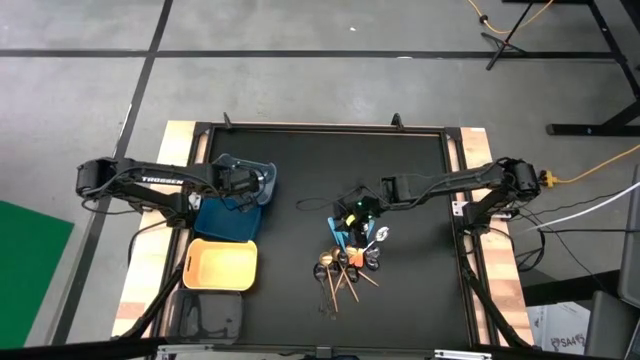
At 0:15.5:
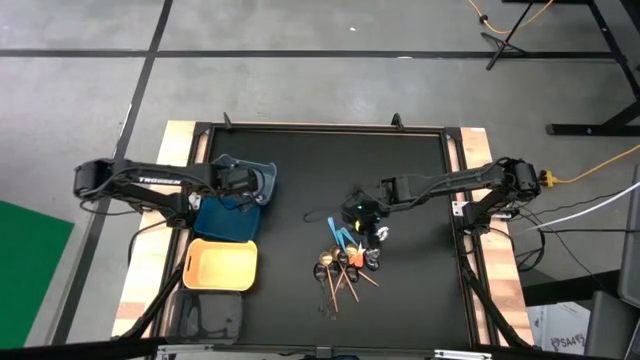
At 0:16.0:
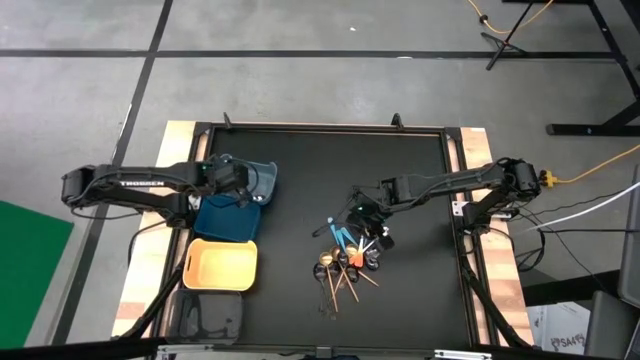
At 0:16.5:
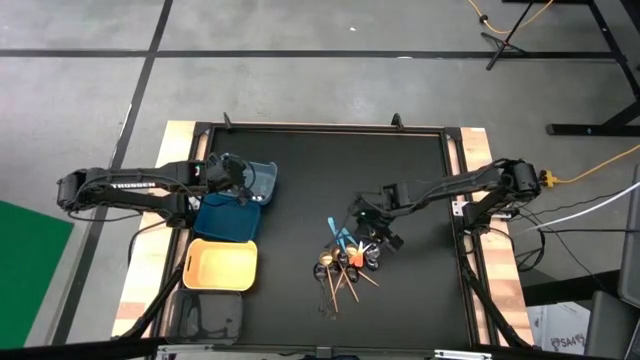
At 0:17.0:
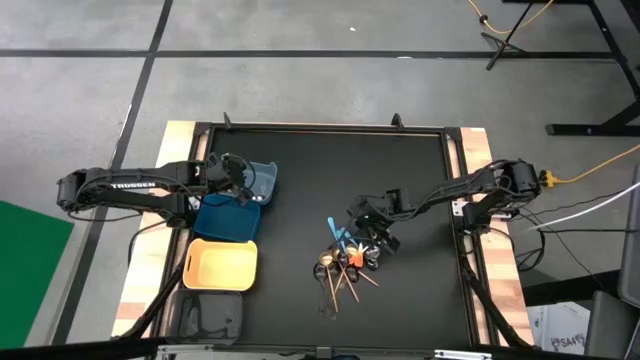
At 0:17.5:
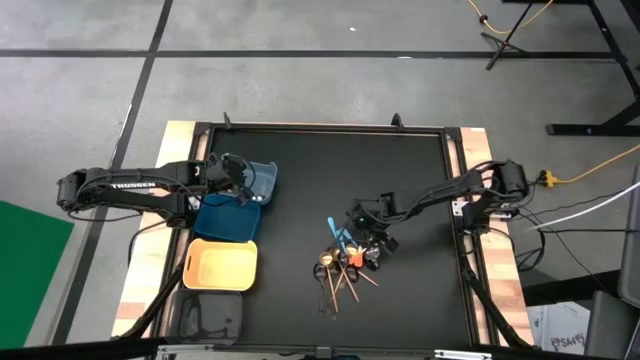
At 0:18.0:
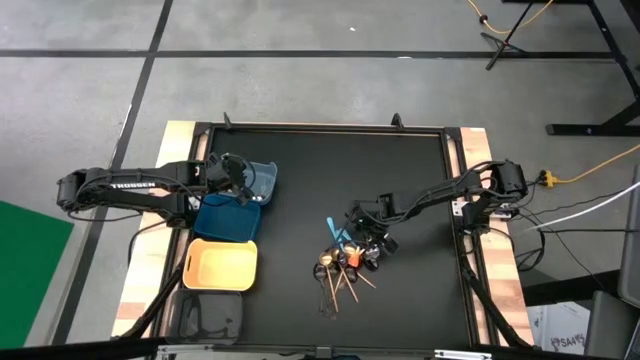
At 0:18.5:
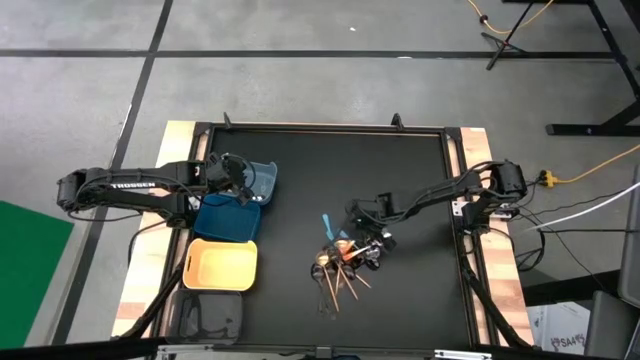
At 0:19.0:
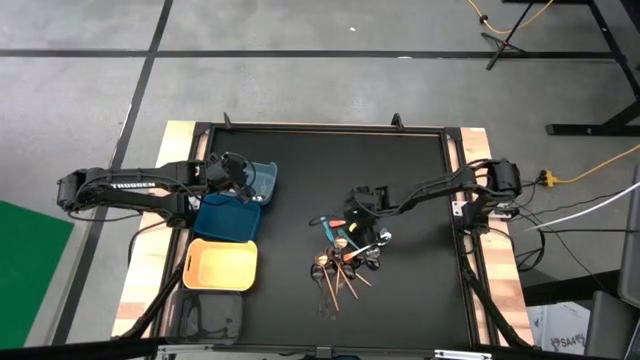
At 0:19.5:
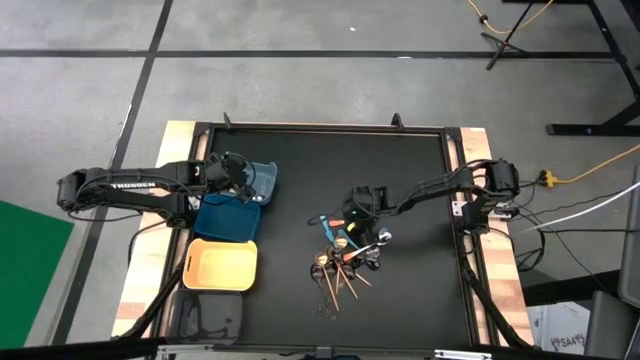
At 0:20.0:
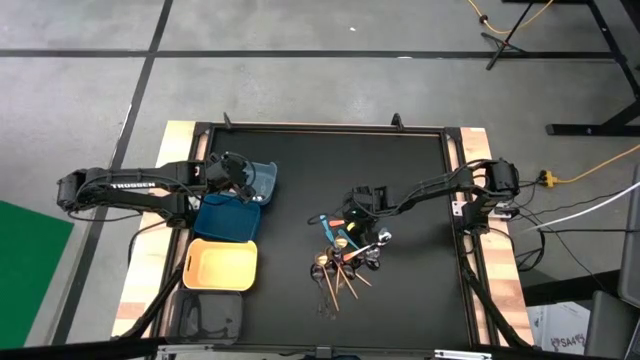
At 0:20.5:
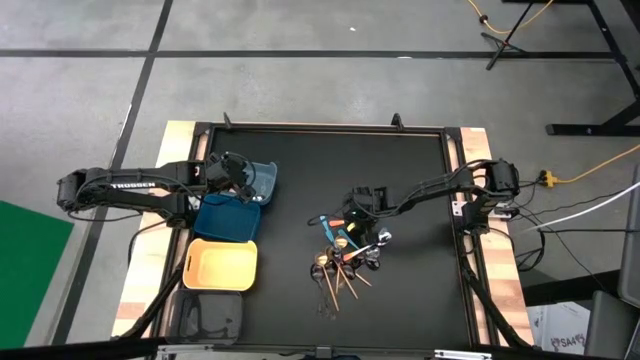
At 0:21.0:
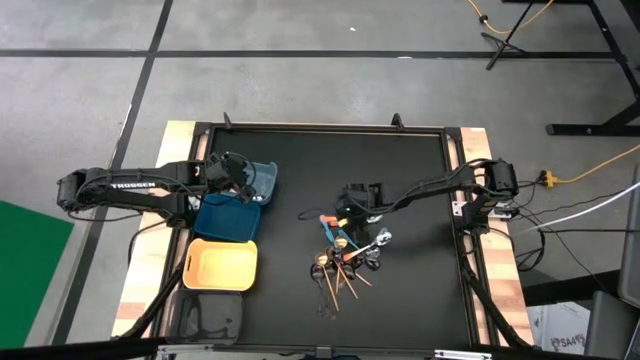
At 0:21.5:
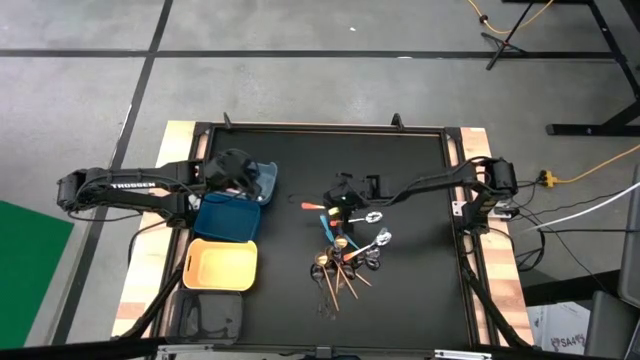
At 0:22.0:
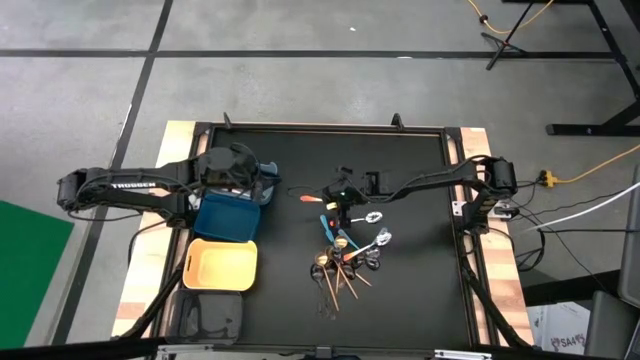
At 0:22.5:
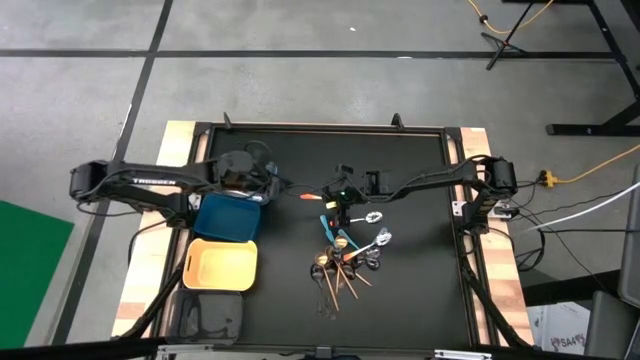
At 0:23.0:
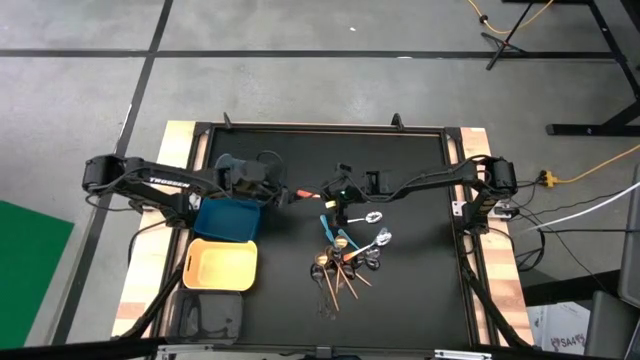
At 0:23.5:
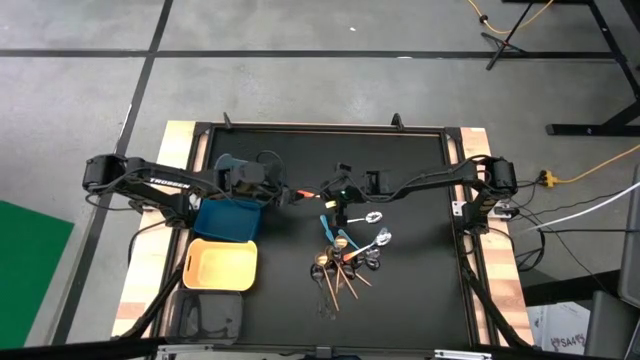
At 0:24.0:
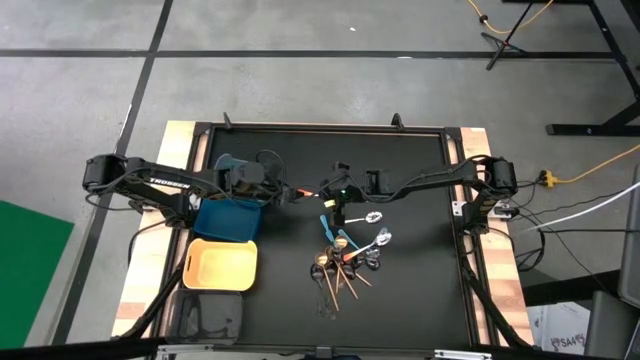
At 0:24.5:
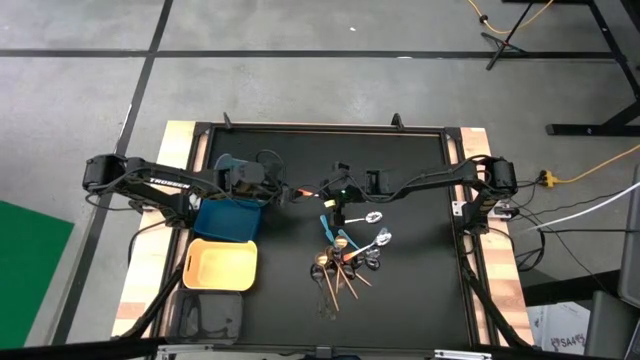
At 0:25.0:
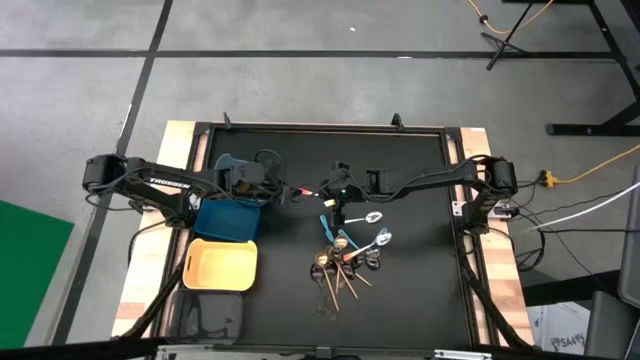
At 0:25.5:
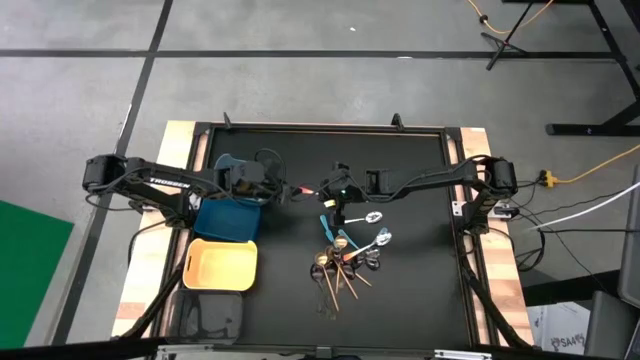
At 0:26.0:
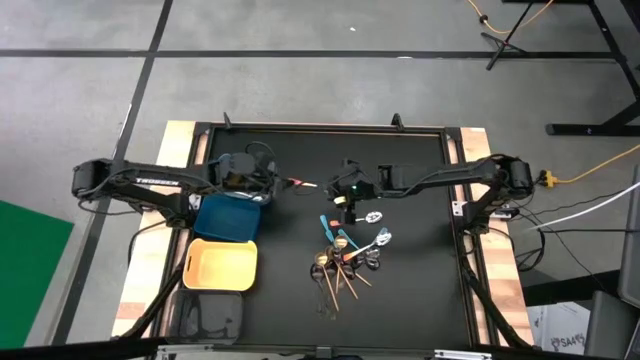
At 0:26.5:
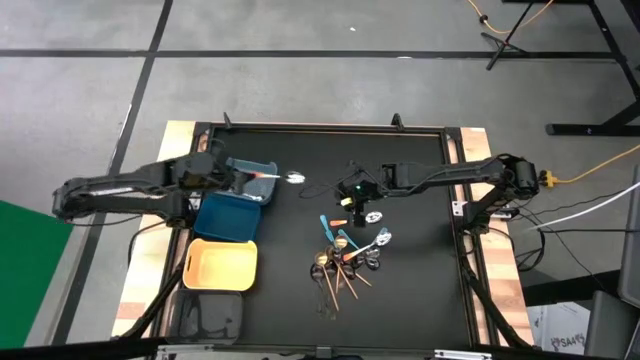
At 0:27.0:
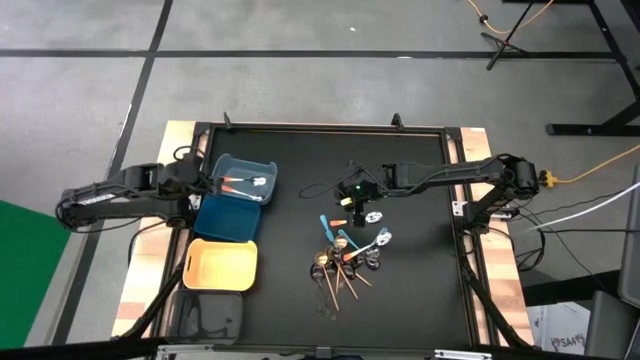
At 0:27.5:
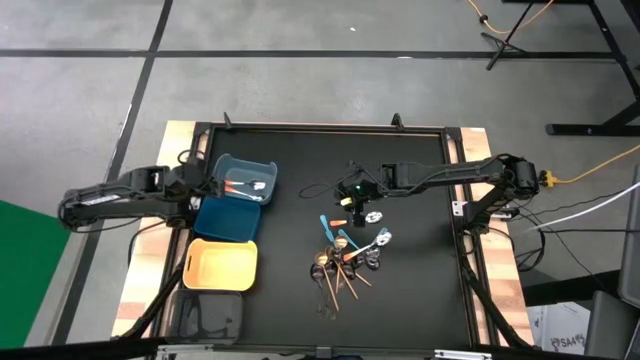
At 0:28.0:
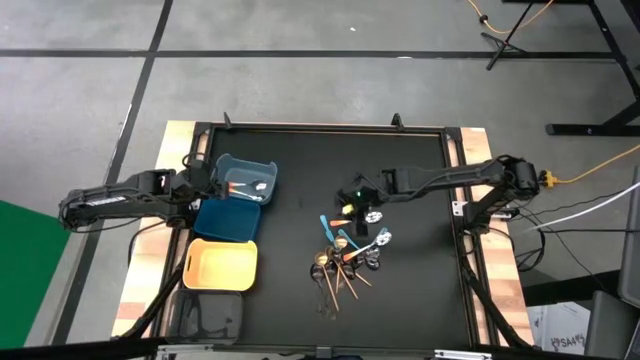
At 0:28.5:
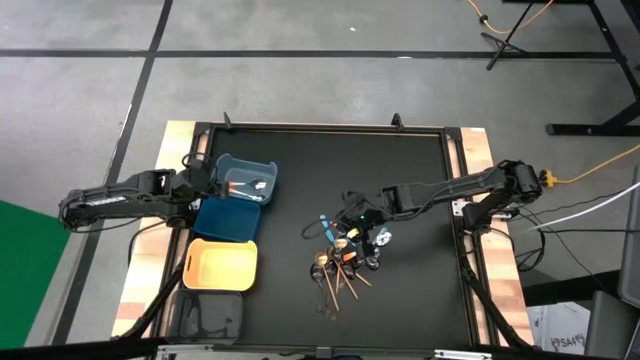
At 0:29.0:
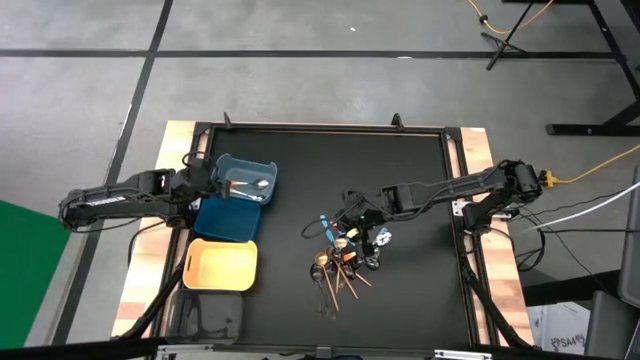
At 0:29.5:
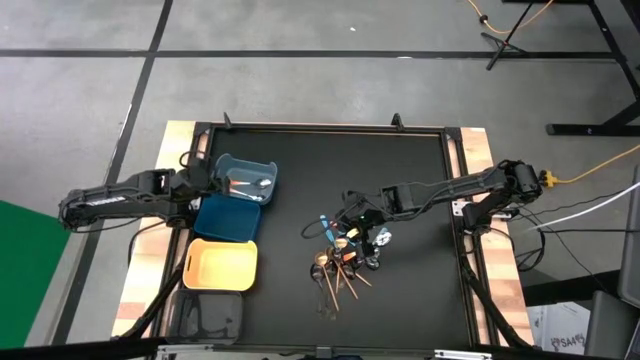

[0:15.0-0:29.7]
Task: Sort silverware by color (type)
Put the orange spoon into the light green bin

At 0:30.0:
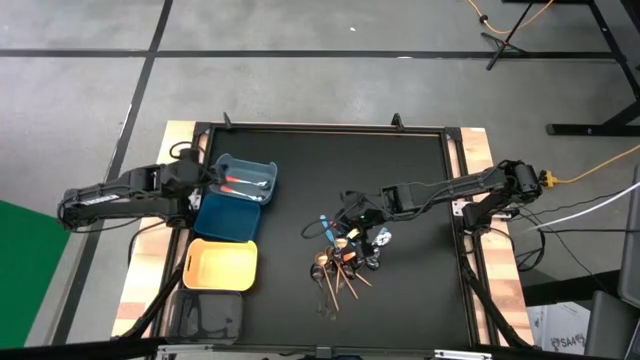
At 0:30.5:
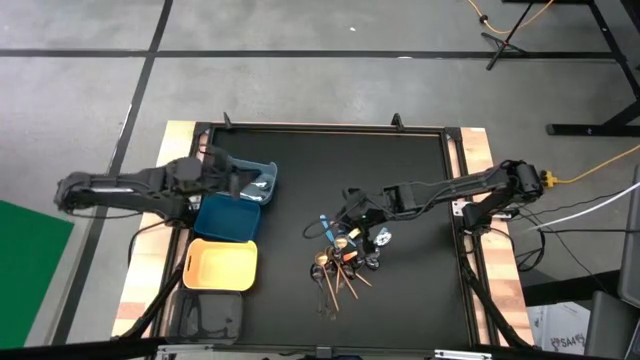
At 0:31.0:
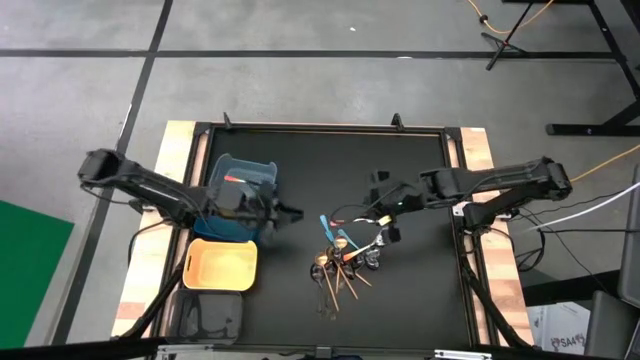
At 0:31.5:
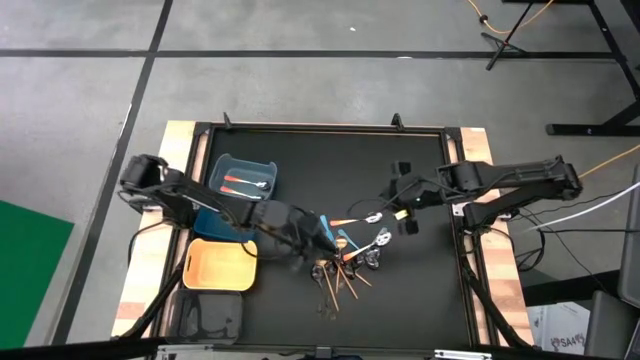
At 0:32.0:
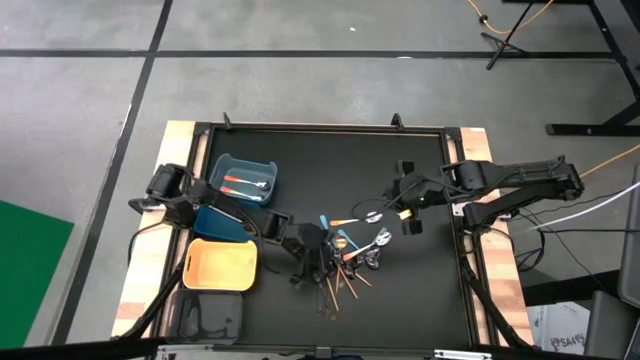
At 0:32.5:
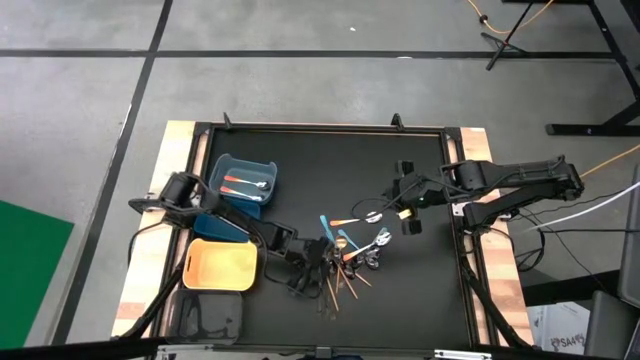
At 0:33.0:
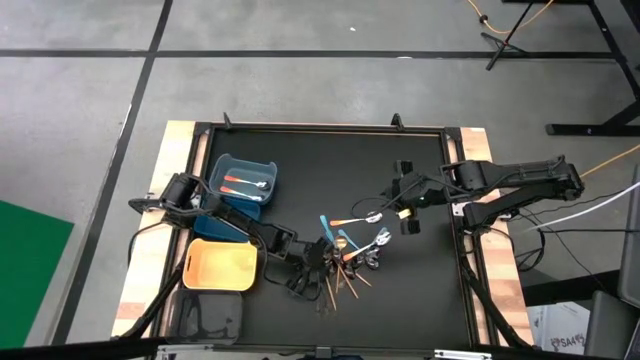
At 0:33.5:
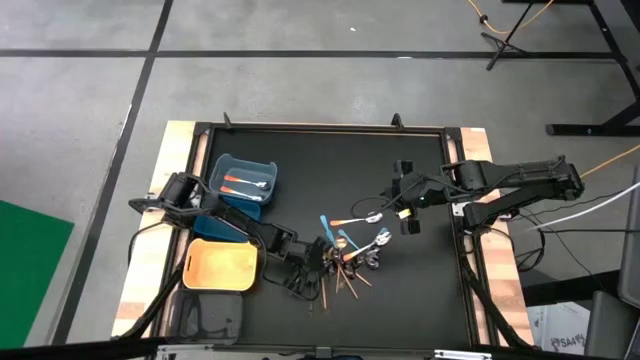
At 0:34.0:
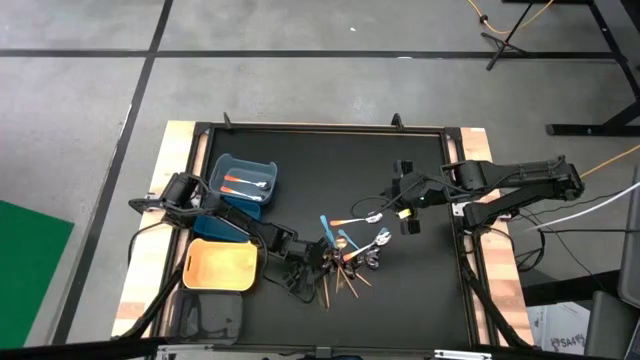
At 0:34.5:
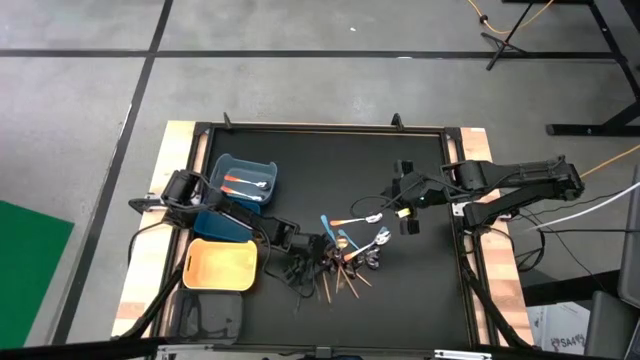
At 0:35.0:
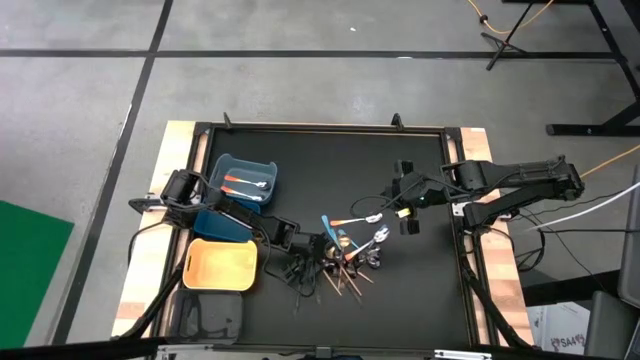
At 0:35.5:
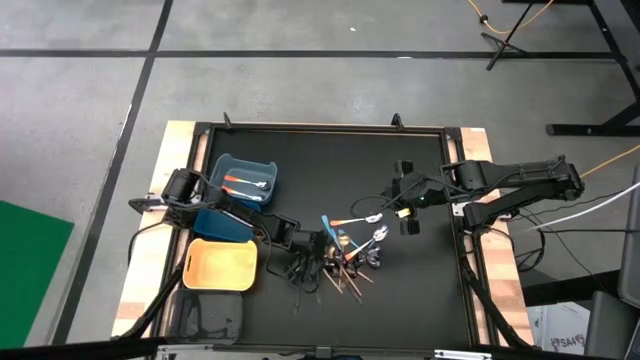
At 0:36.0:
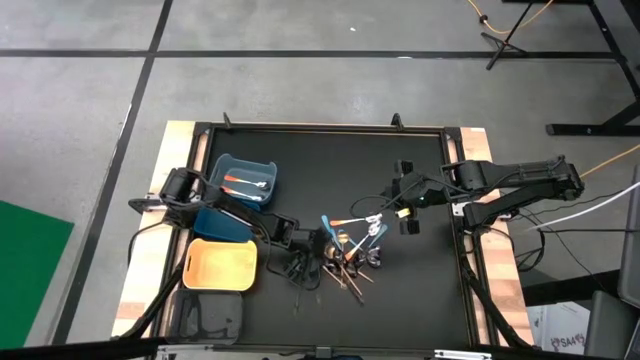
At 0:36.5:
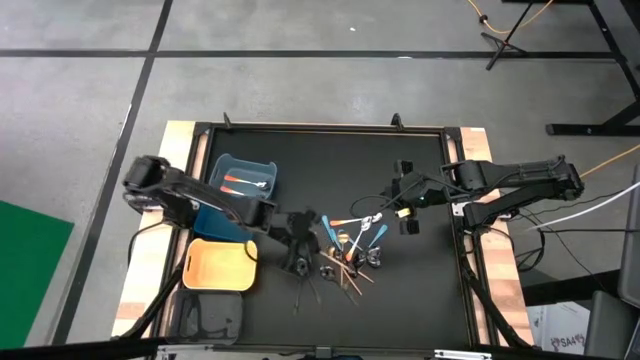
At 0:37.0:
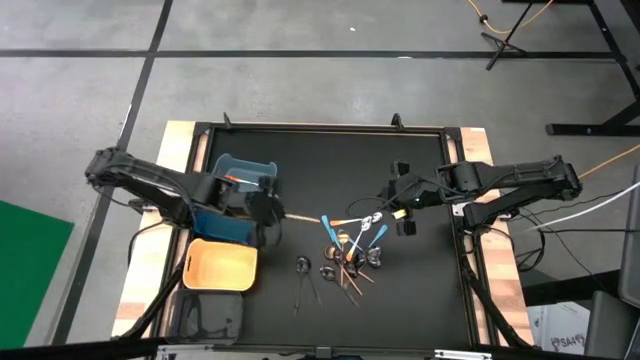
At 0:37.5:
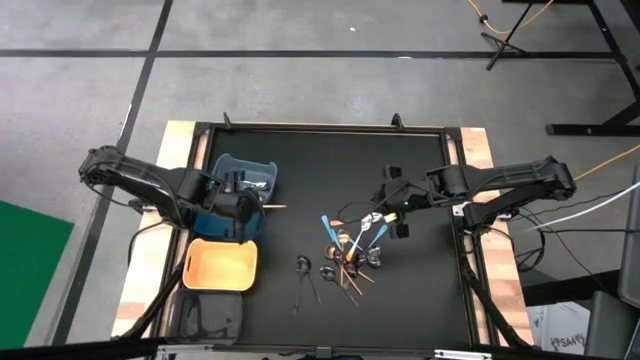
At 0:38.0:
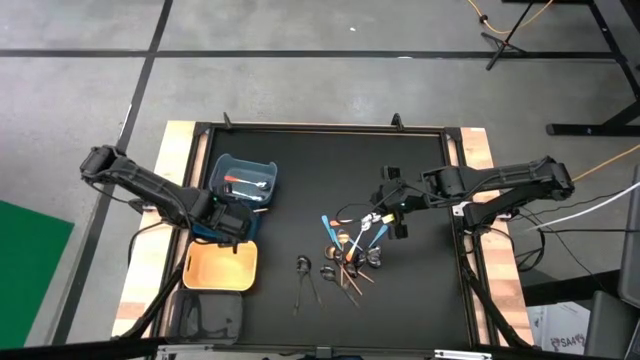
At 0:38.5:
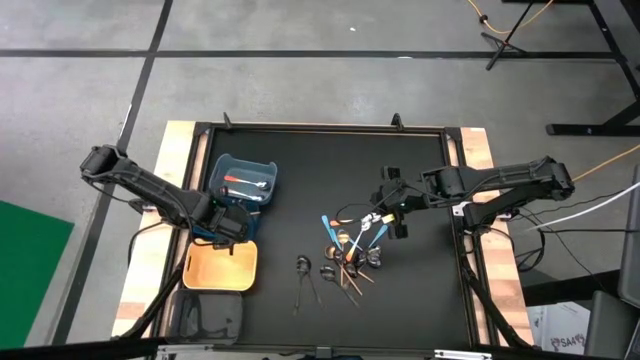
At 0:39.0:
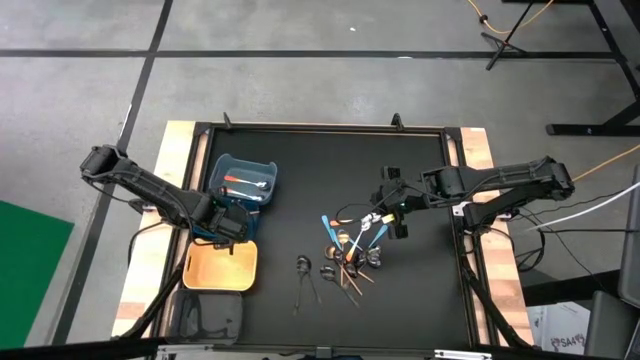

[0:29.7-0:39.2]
Put the gold spoon into the blue bin
